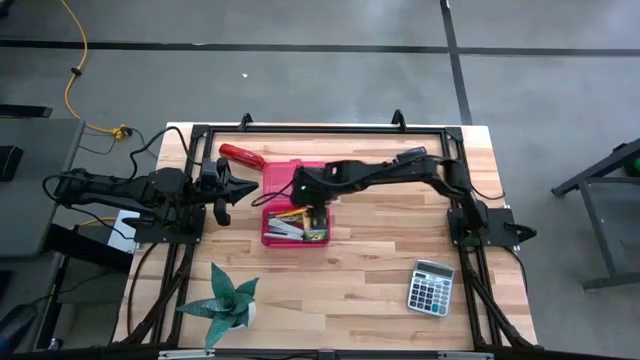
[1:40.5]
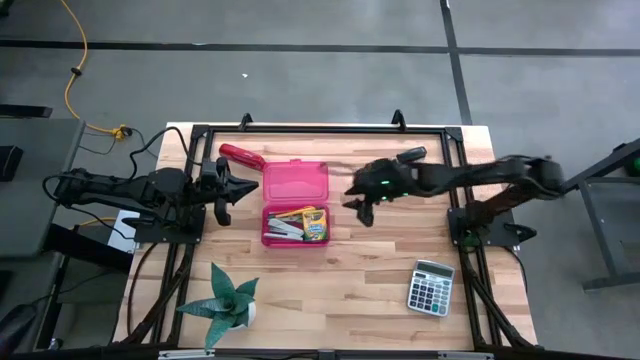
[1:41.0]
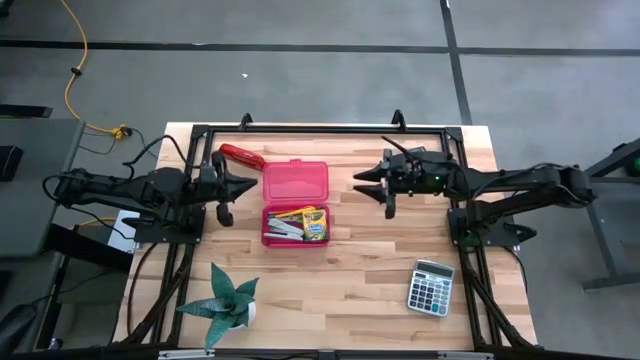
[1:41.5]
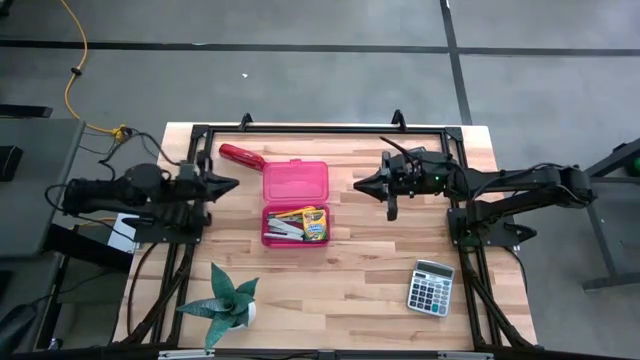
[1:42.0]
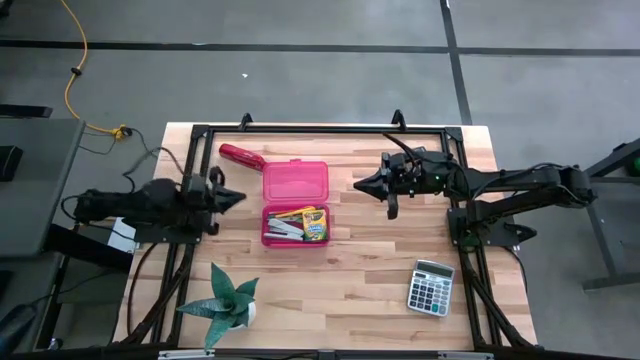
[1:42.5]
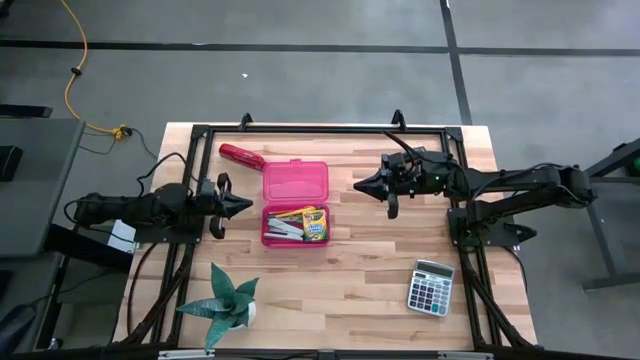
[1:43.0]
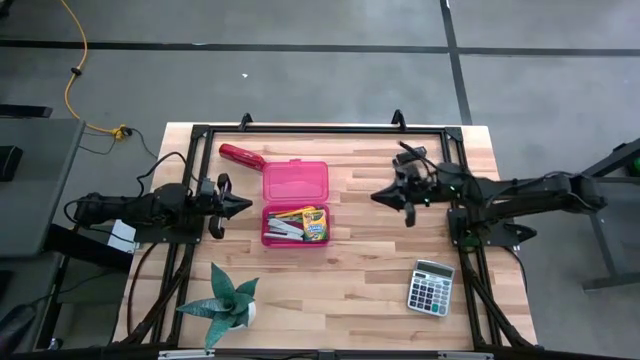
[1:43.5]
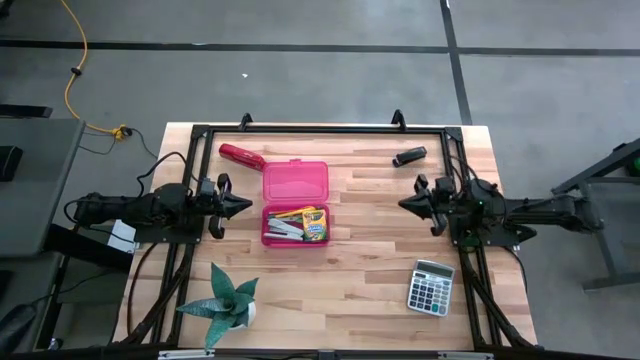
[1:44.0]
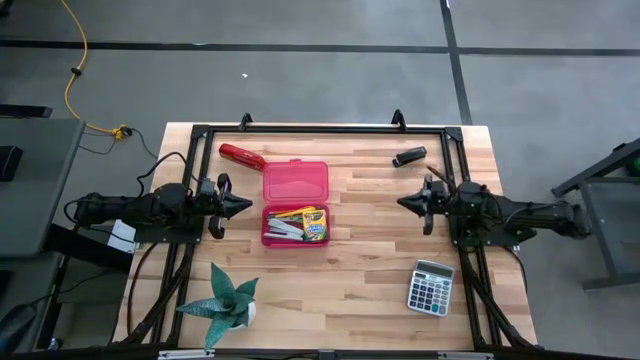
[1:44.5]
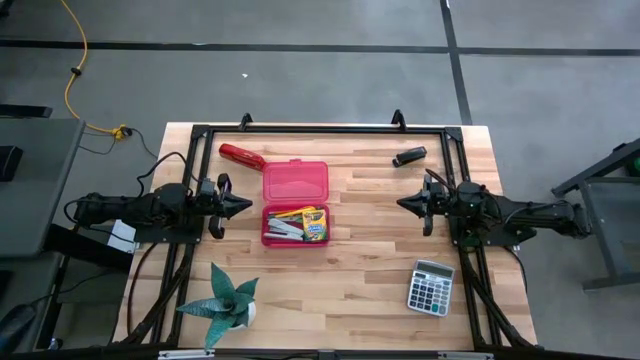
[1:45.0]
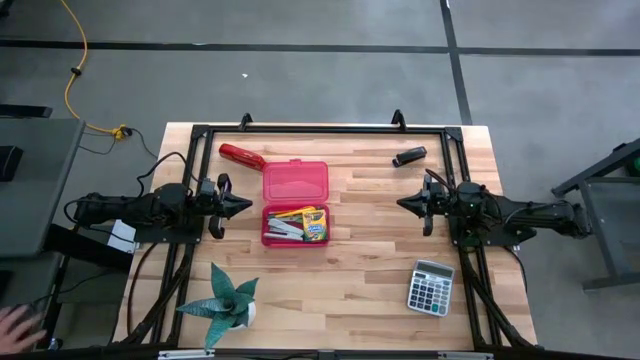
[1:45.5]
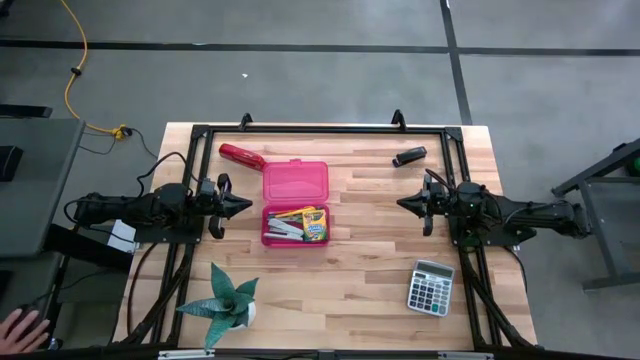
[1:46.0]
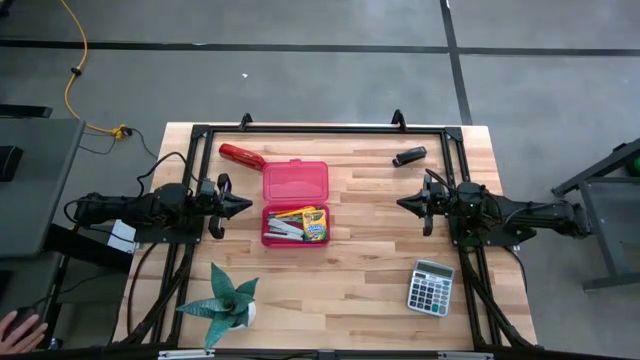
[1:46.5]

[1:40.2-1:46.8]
Task: Pack school essentials
Return to Home Position

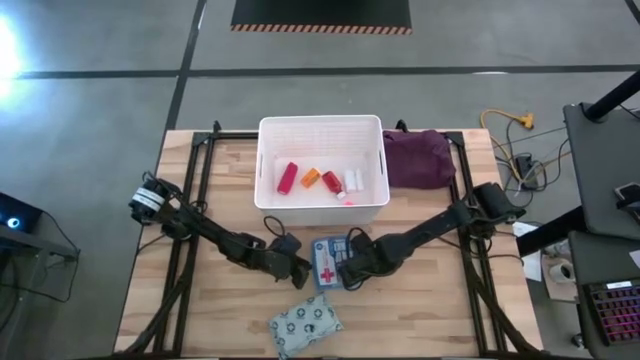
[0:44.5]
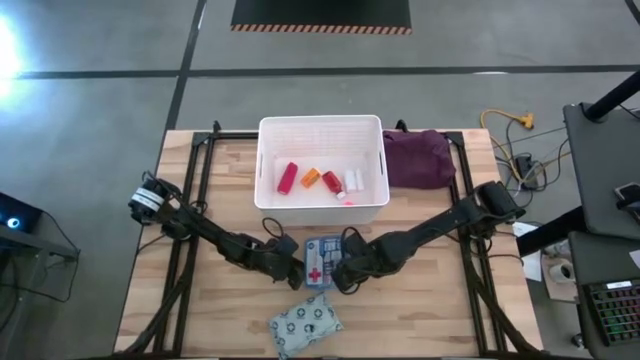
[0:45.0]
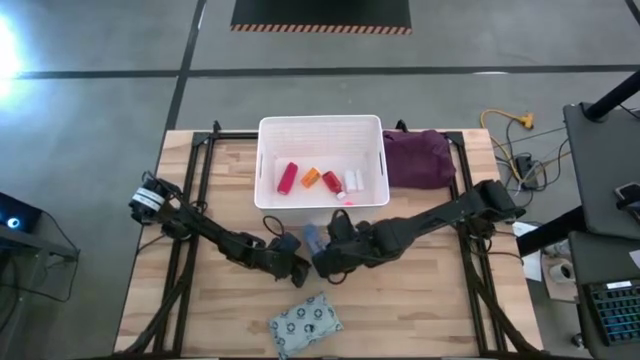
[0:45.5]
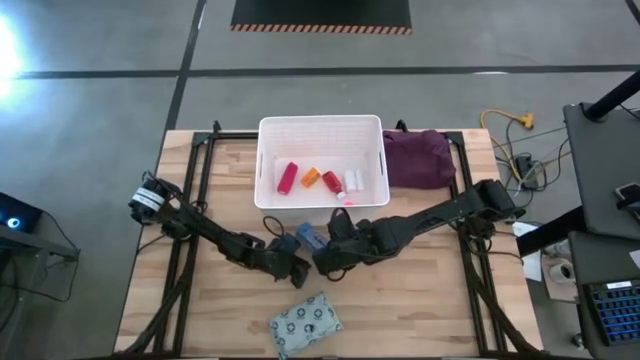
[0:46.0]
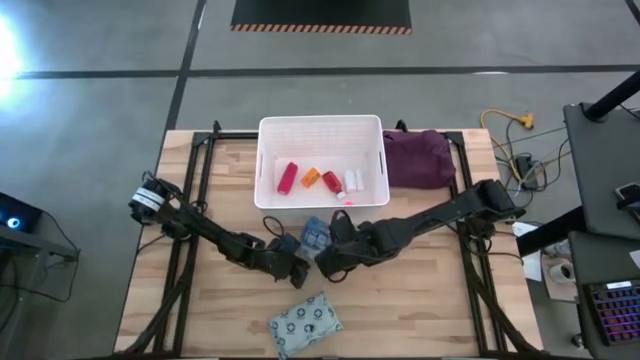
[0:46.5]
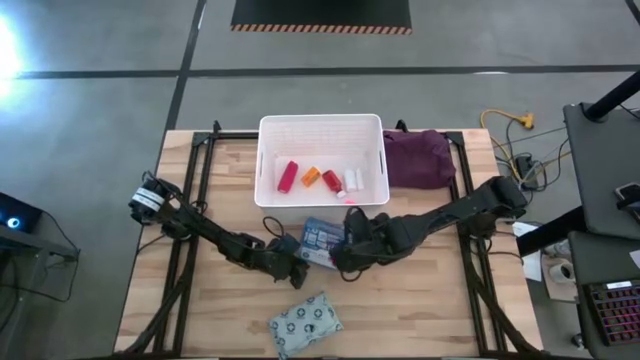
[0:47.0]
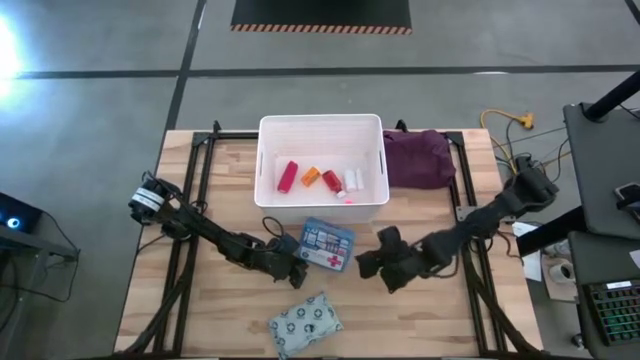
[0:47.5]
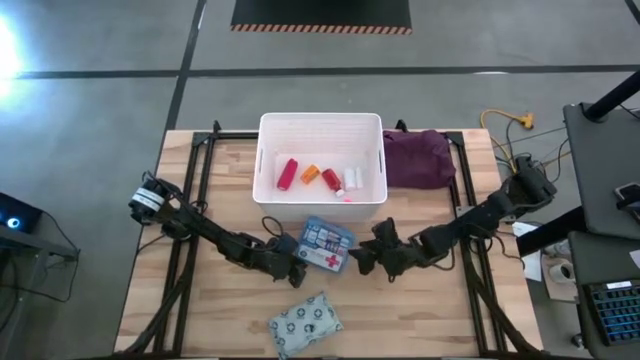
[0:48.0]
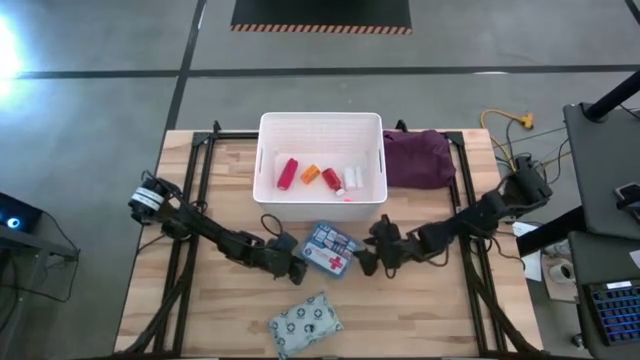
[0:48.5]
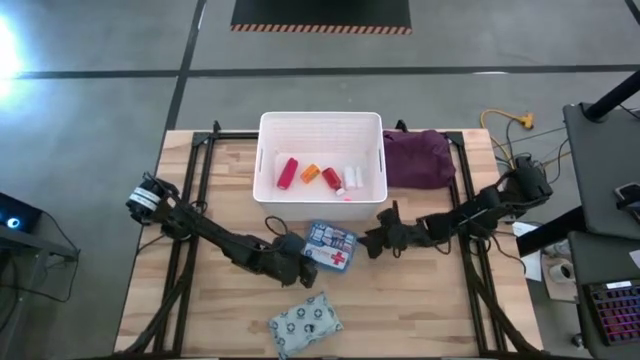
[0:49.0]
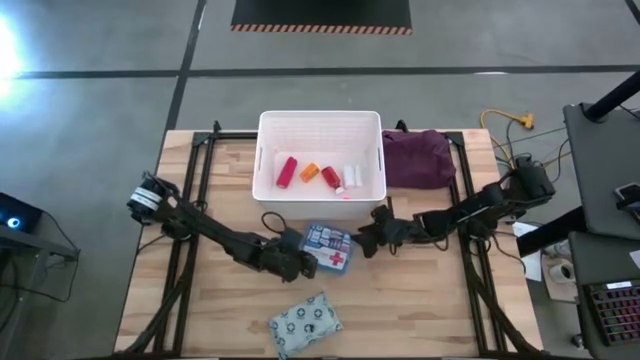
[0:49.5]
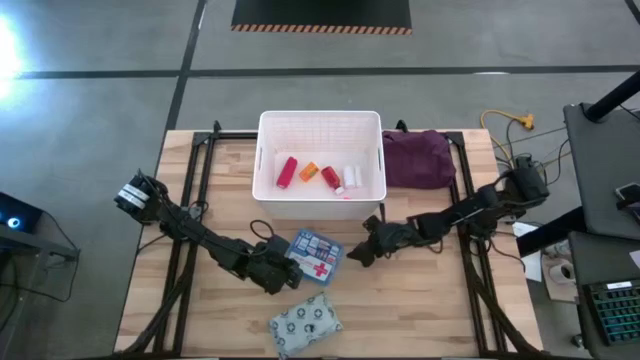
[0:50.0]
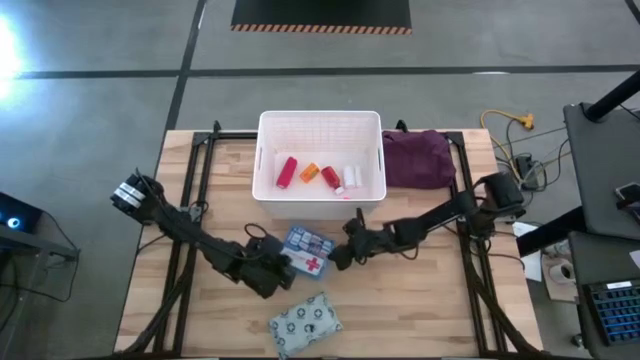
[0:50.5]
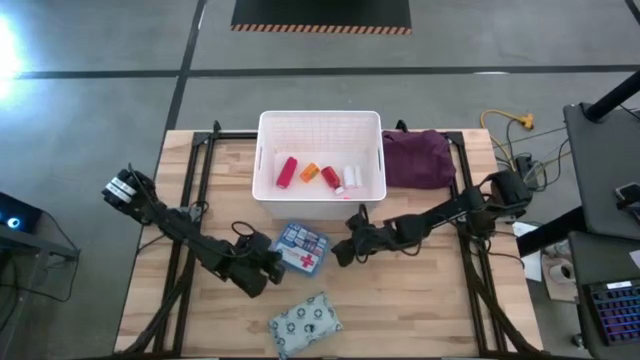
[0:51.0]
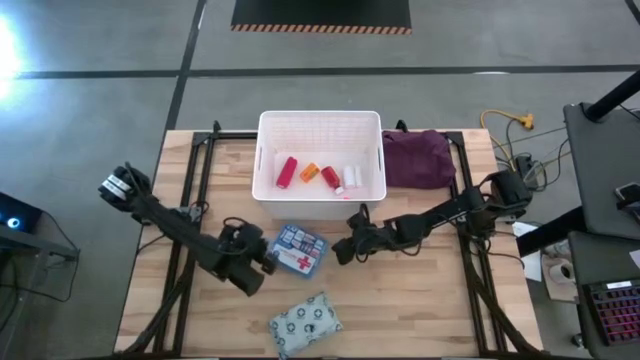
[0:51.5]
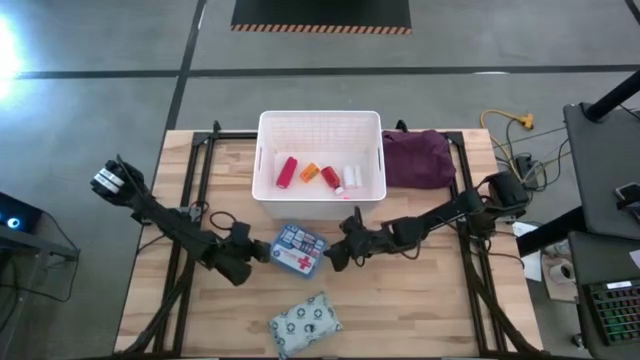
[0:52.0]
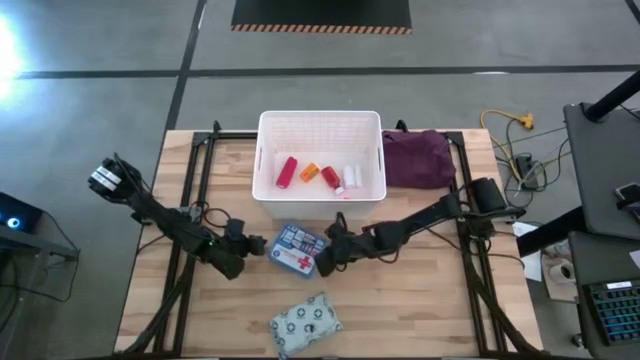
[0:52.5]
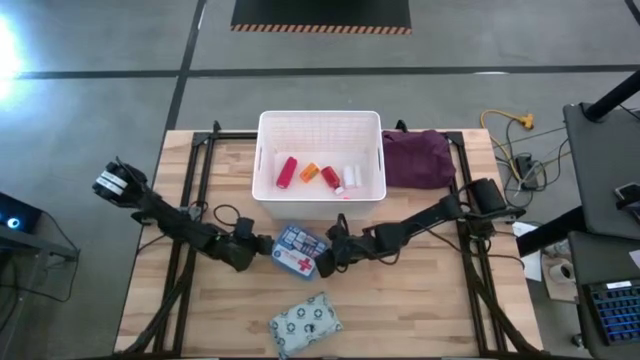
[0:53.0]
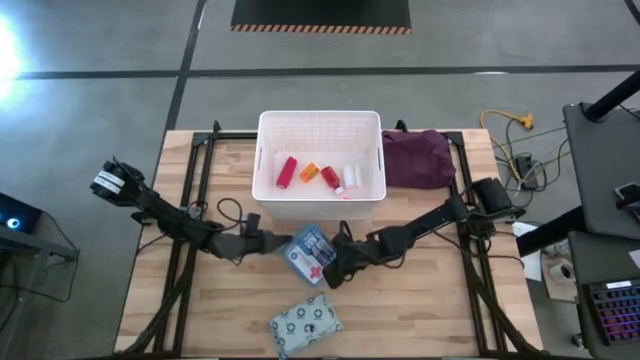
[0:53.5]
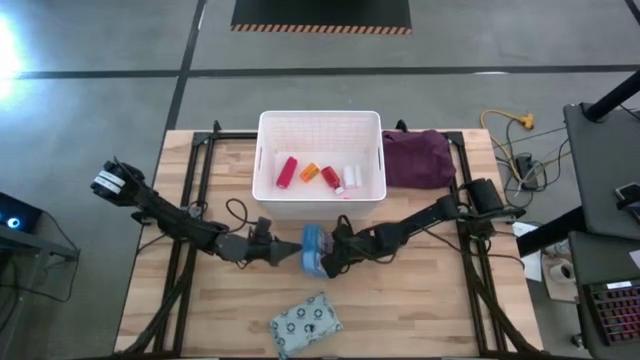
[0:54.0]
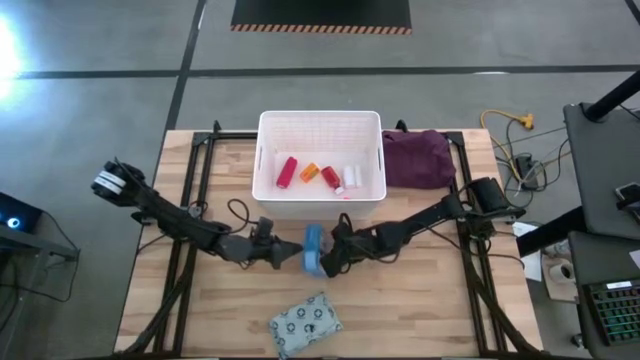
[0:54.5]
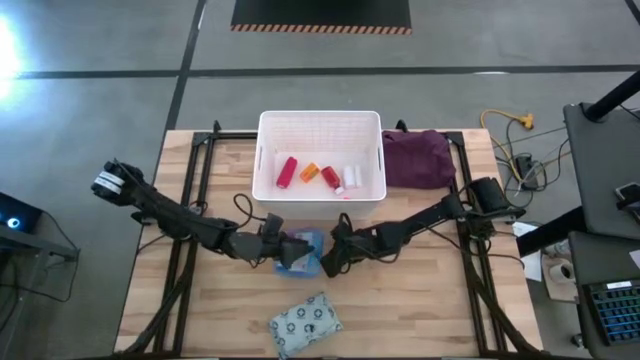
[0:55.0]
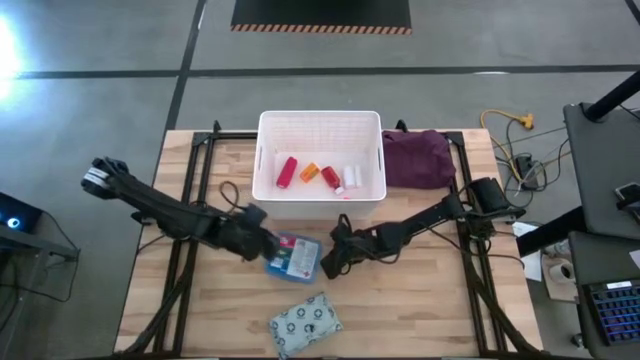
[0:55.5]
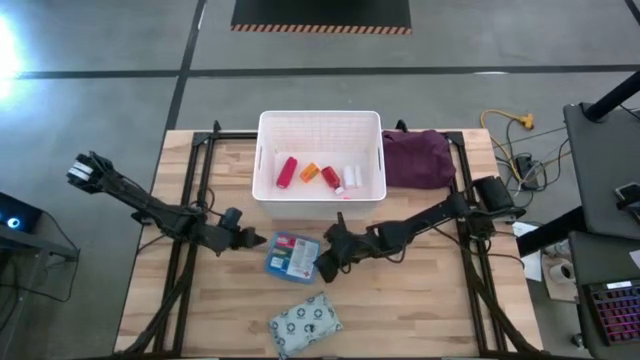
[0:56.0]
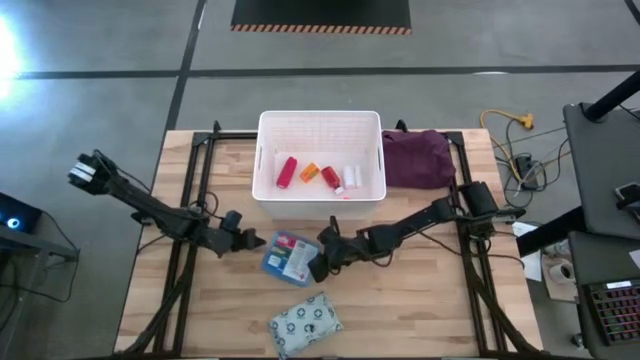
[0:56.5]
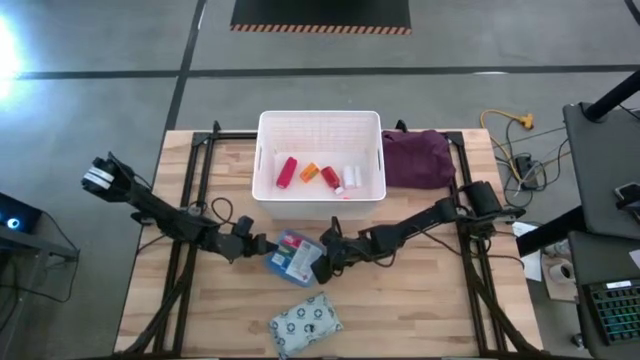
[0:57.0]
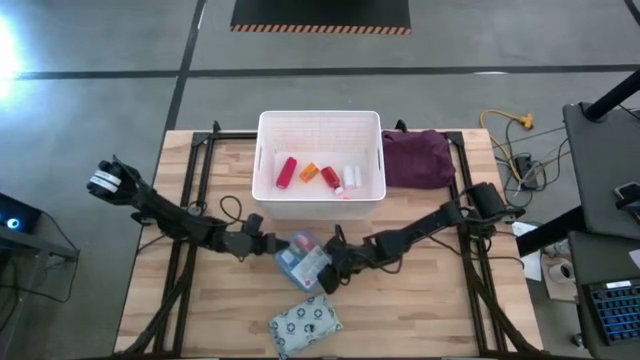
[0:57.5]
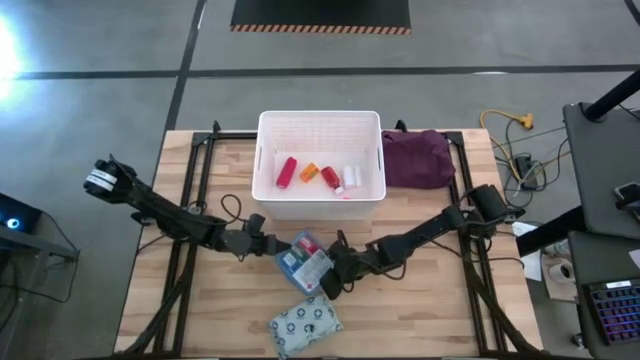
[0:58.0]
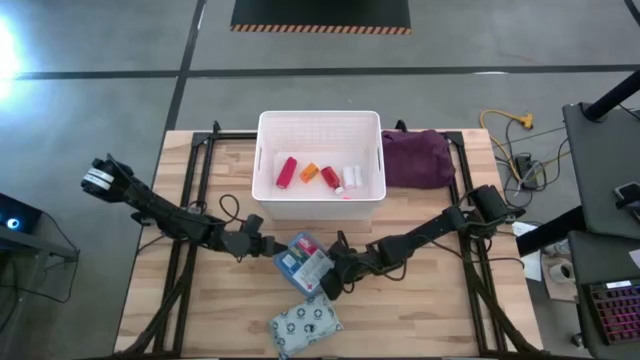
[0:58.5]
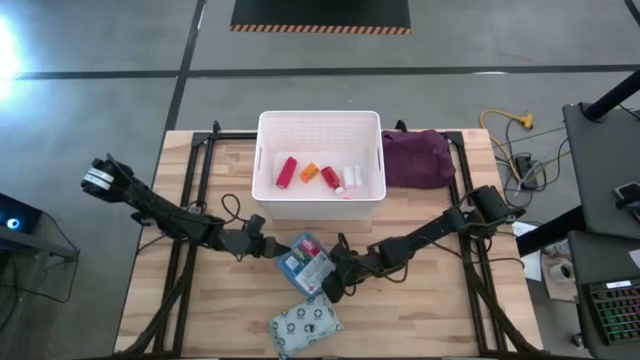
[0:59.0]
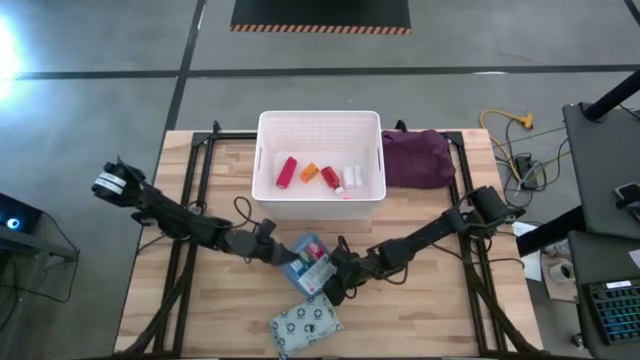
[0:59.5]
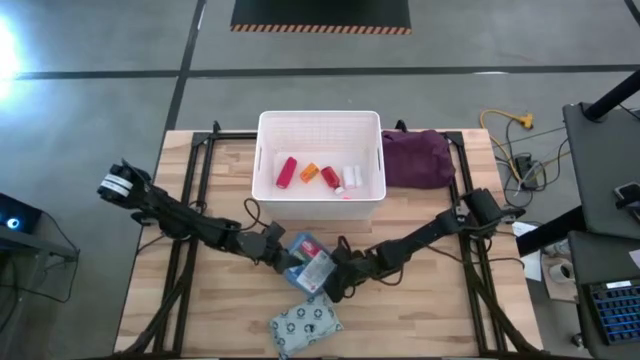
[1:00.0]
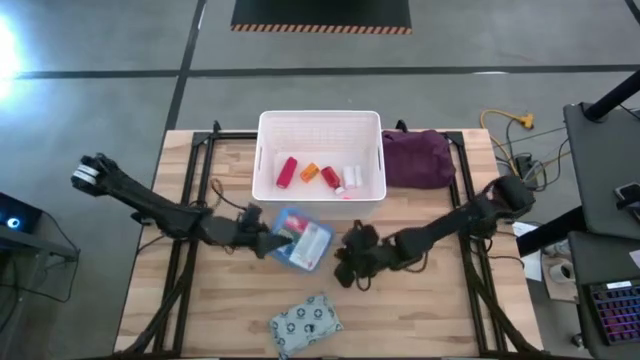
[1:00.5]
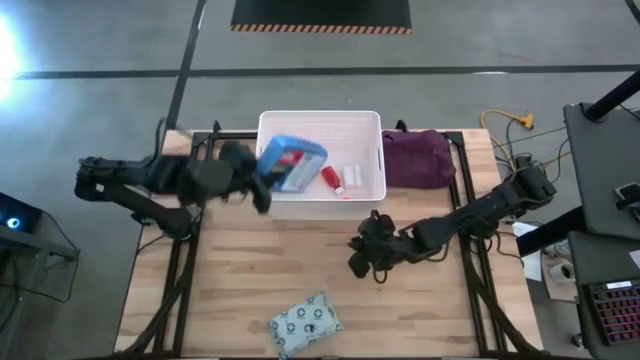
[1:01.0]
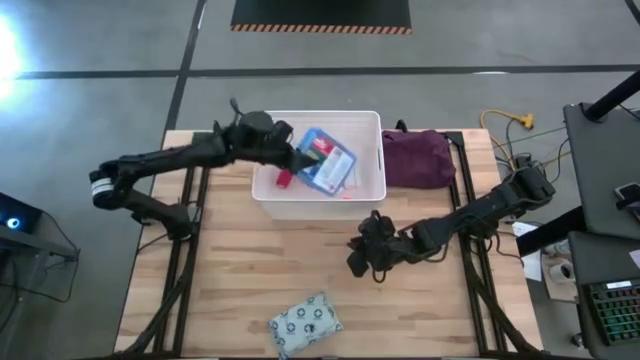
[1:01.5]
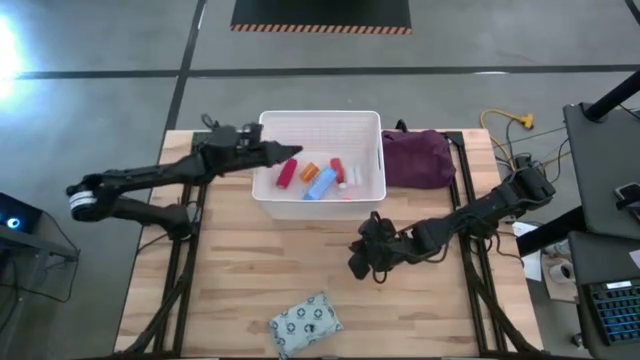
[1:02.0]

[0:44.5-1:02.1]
Task: Pick & place medical supplies in basket/bin
Put the blue first aid kit into the white bin
